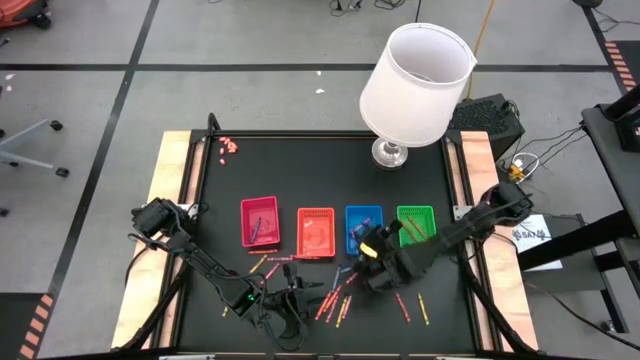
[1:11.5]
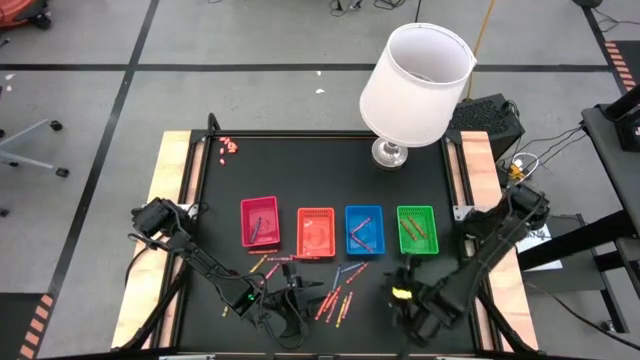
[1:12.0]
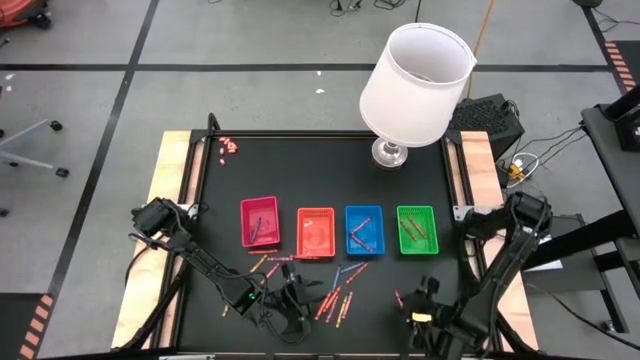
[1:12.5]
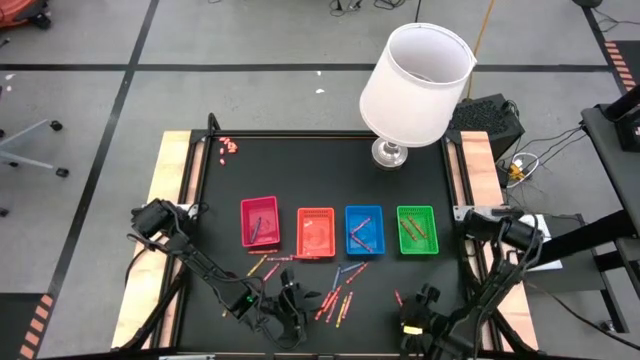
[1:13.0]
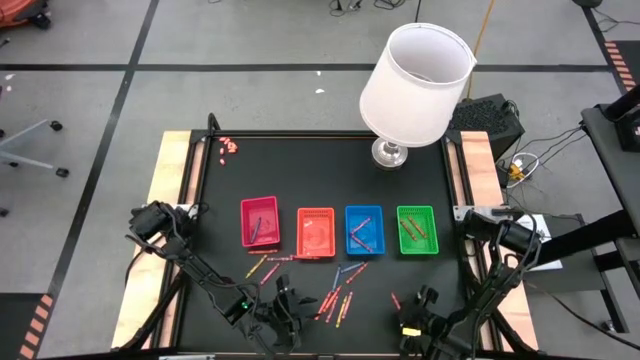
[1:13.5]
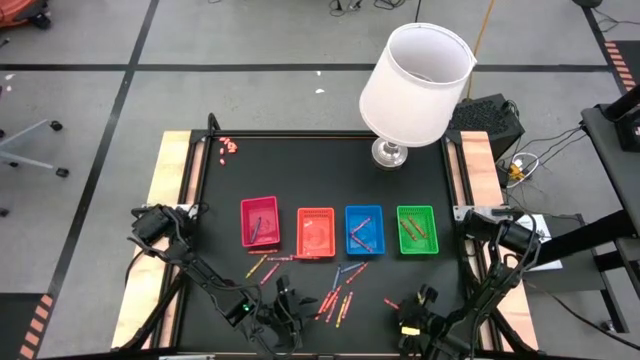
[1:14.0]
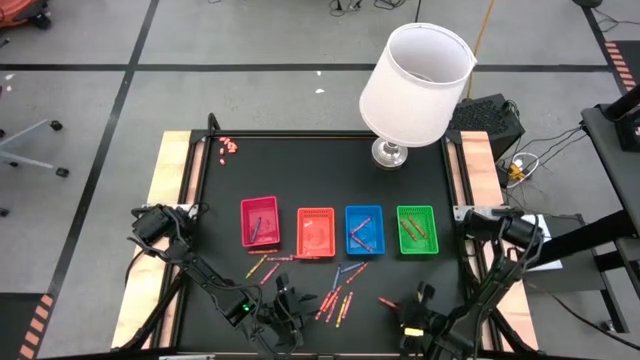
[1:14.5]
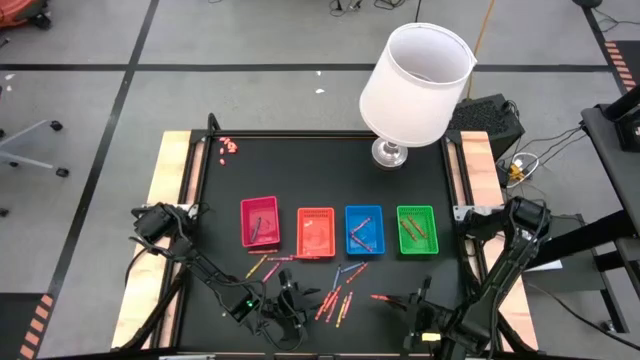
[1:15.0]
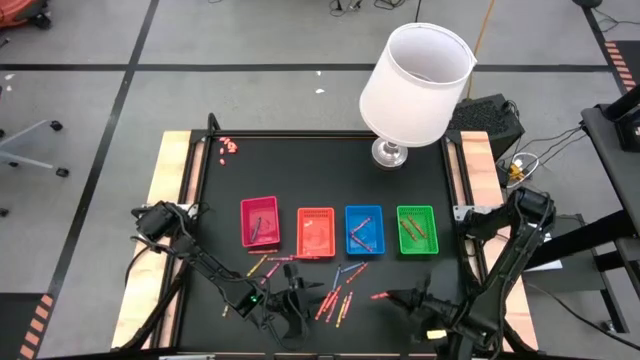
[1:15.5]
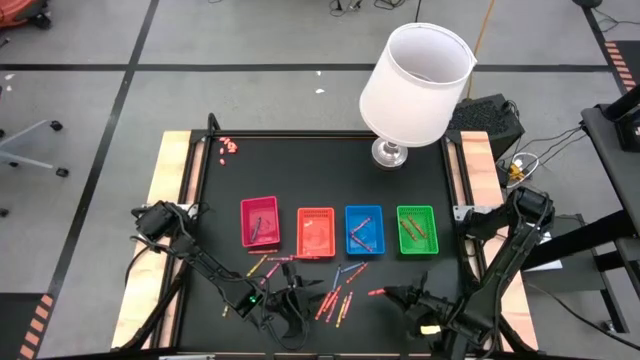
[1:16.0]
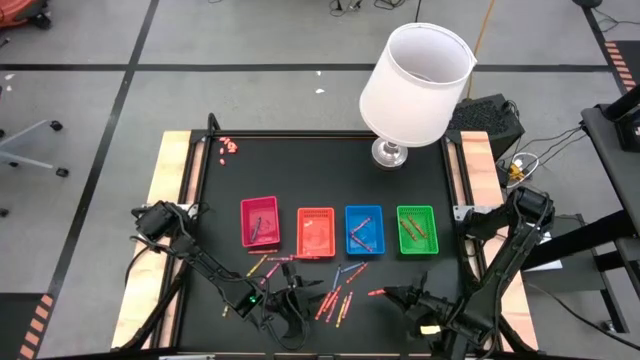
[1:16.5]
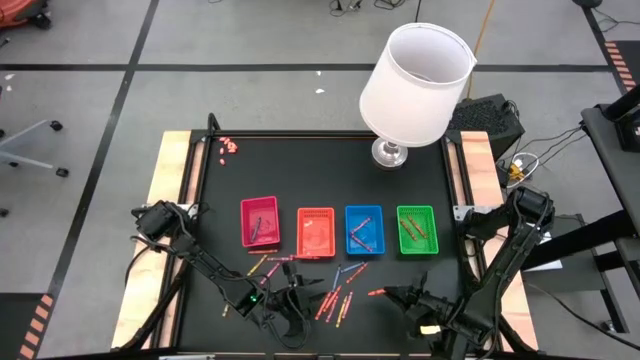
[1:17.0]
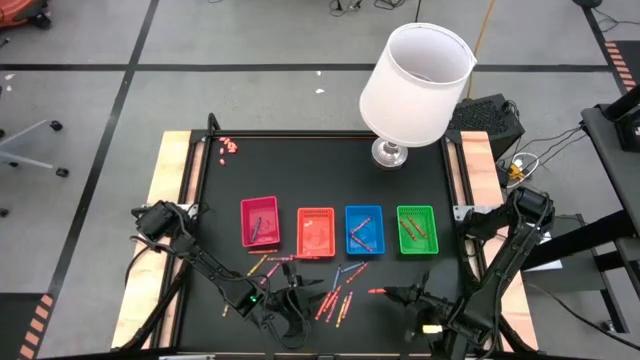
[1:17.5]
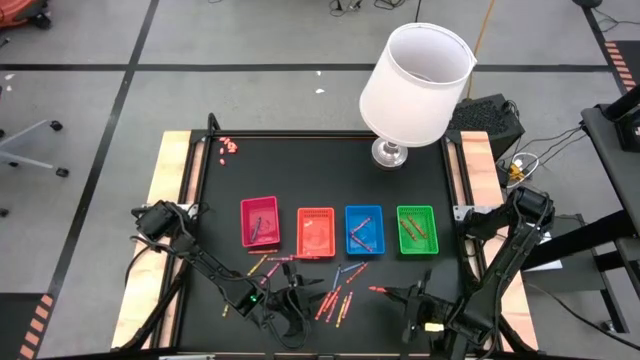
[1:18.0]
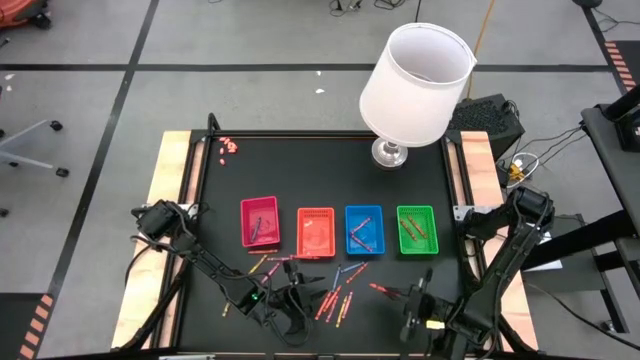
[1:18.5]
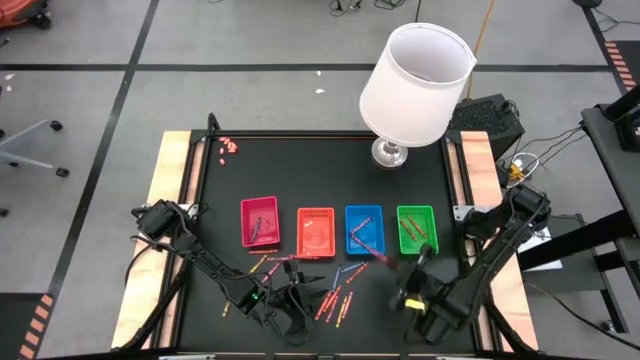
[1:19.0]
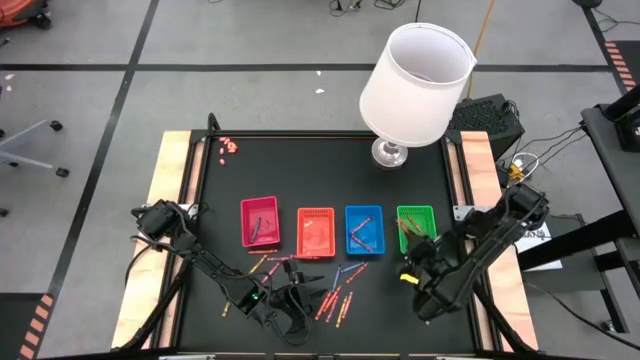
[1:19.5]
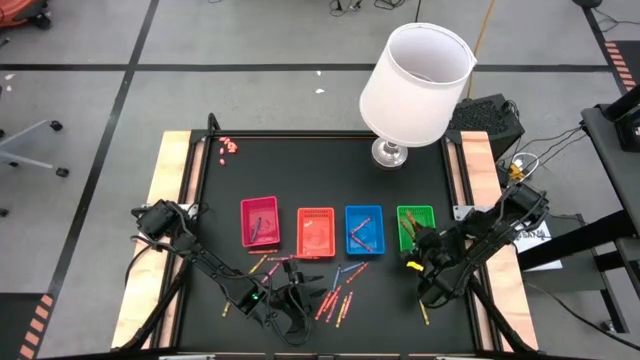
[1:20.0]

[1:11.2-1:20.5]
Task: Sort crayons
Put the orange crayon into the green bin

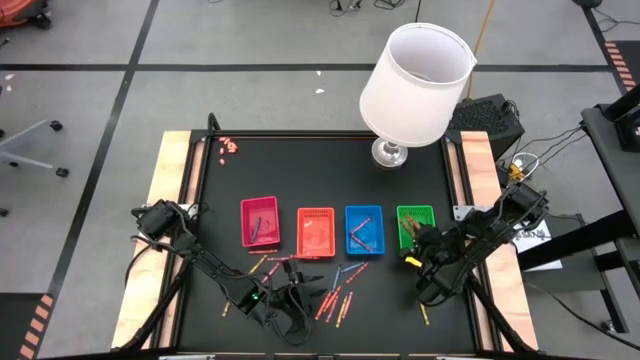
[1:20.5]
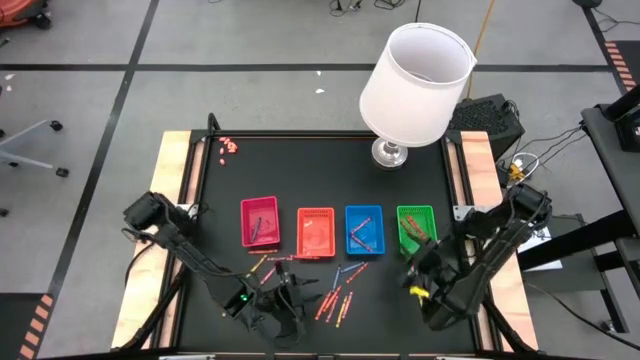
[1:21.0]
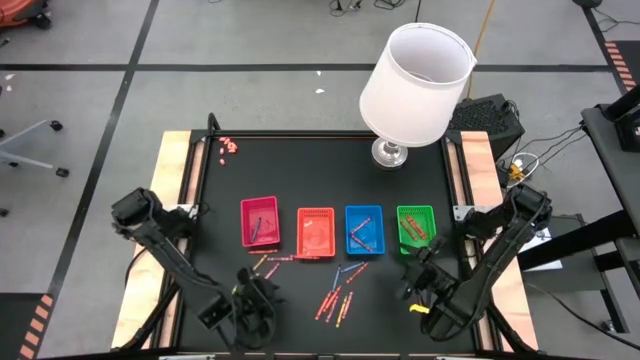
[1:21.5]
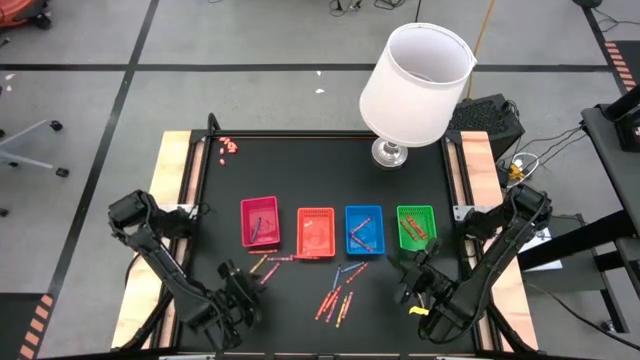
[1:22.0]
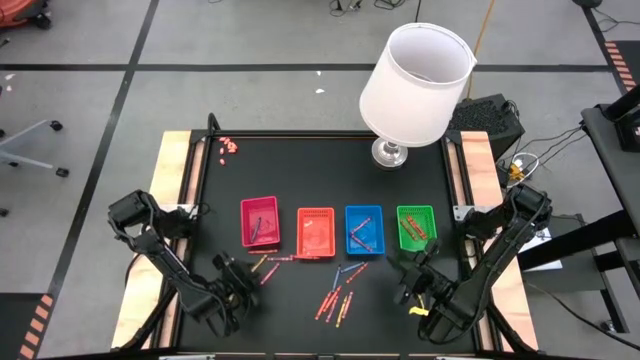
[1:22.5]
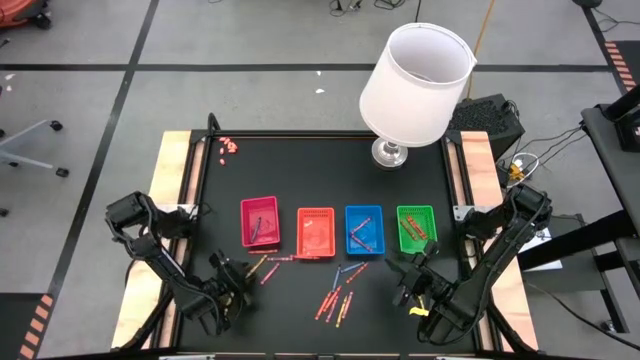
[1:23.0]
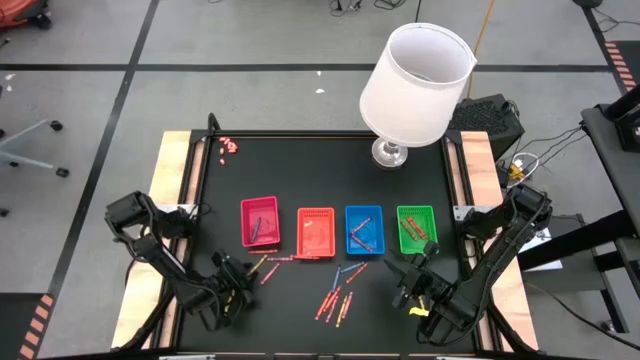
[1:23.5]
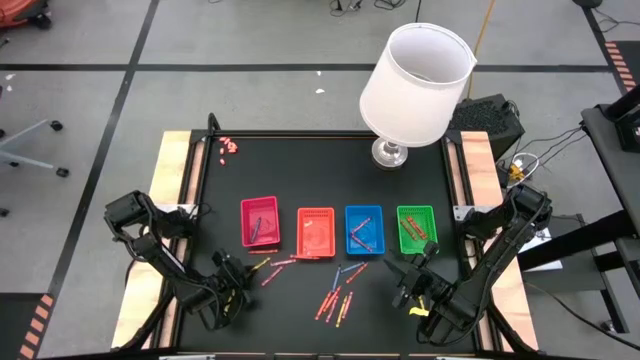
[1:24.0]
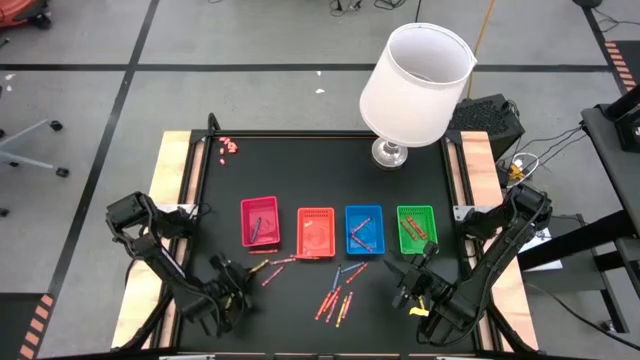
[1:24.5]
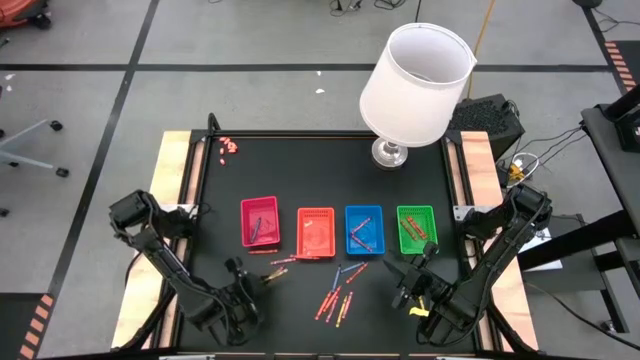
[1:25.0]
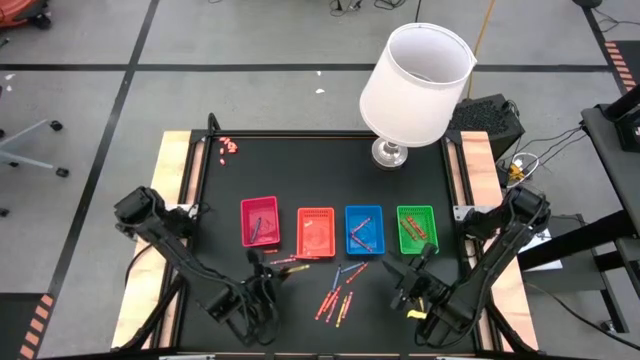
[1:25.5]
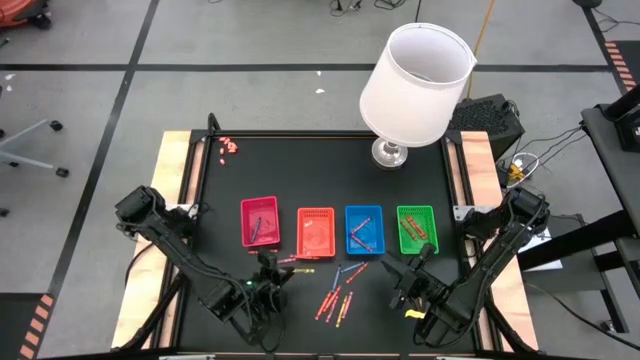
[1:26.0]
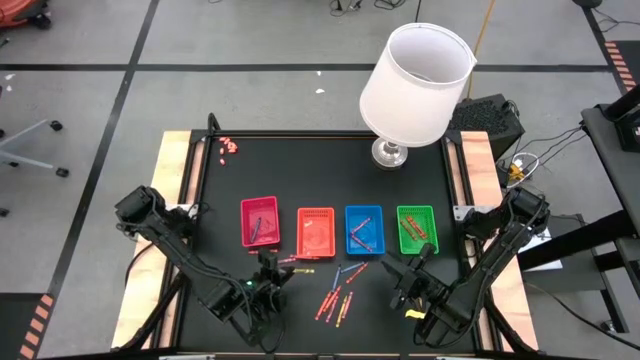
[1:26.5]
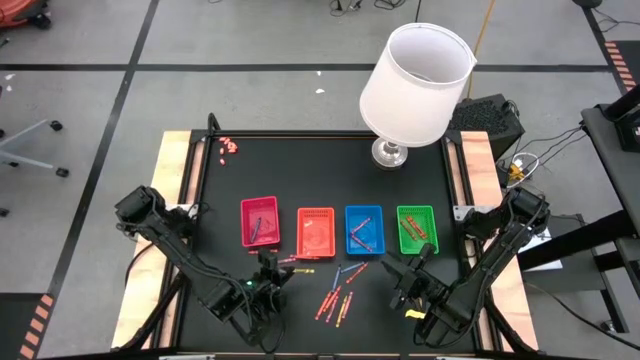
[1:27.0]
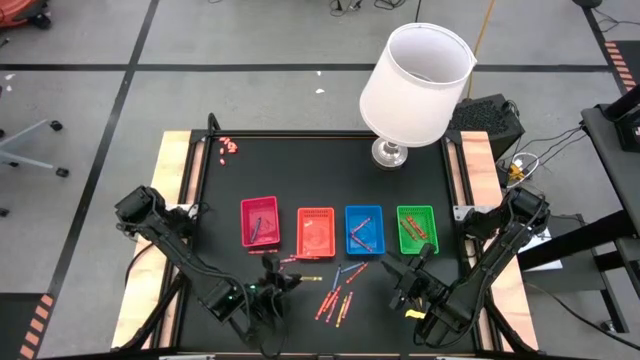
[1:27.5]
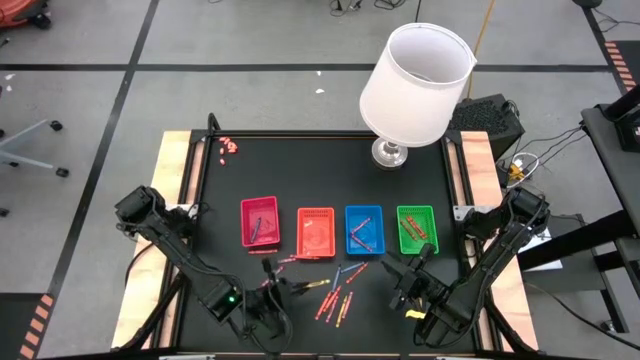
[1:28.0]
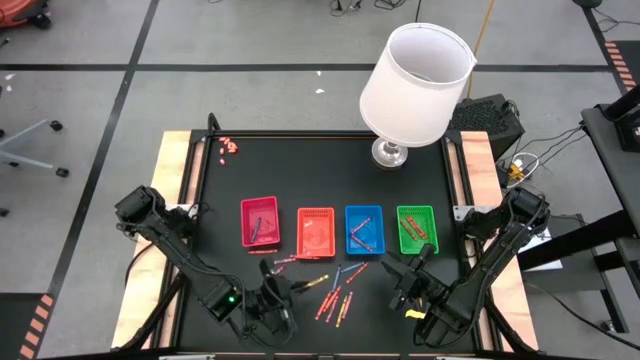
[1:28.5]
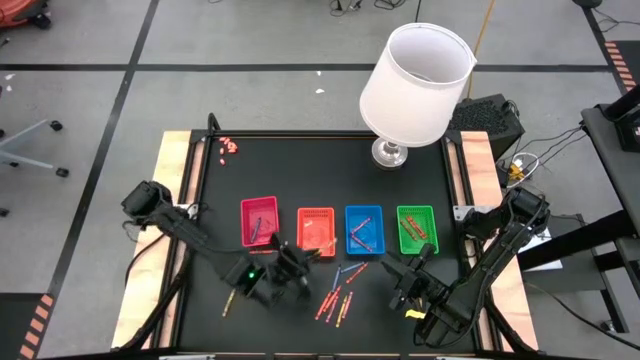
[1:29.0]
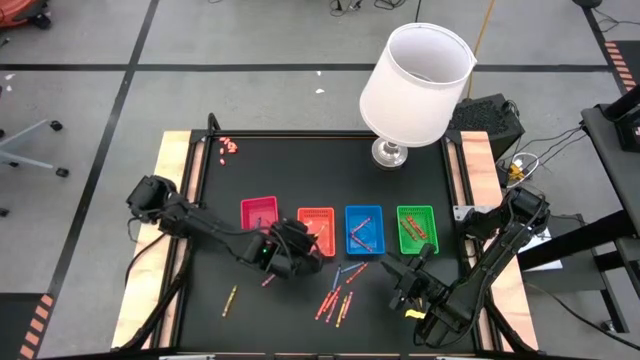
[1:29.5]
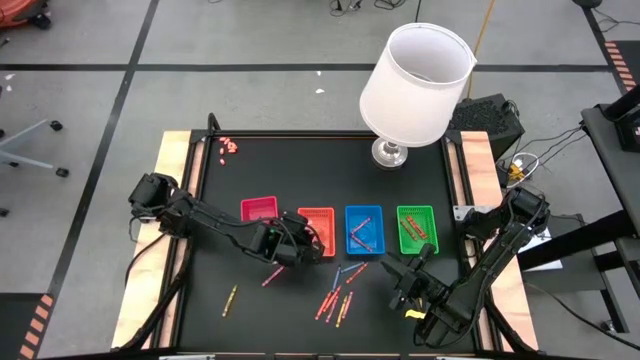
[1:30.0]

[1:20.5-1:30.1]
Put the yellow crayon into the orange bin

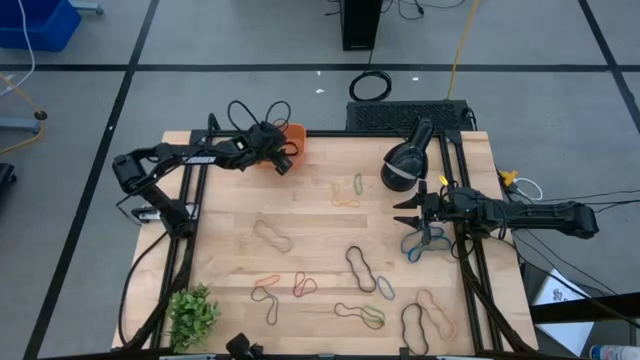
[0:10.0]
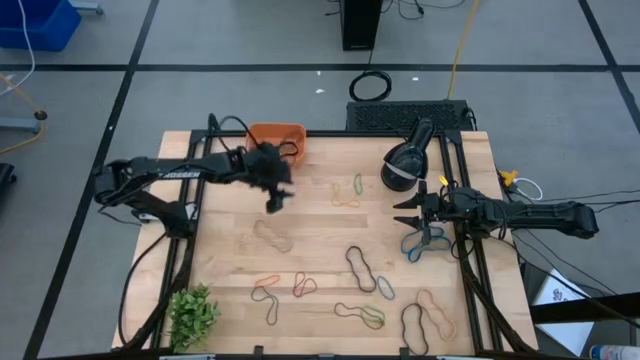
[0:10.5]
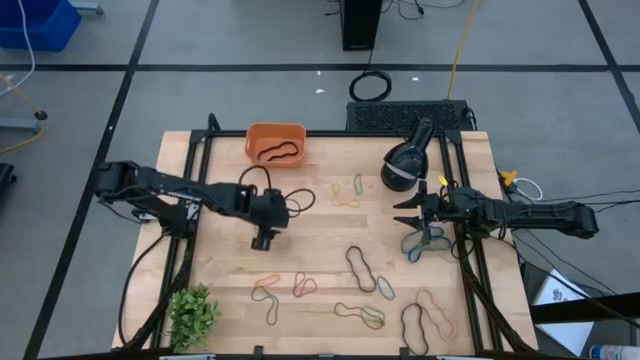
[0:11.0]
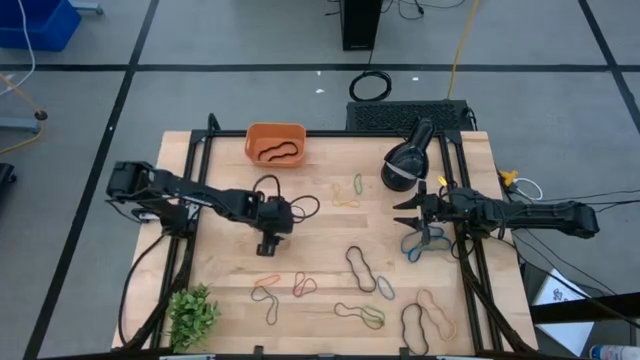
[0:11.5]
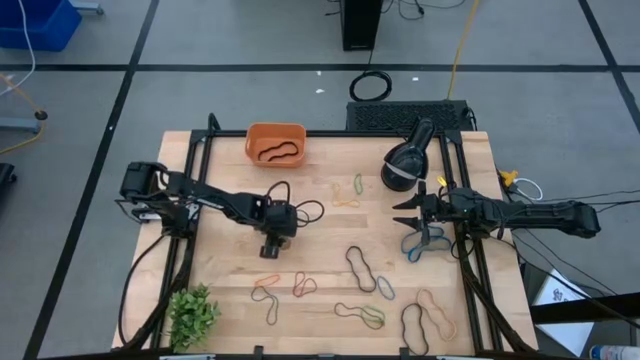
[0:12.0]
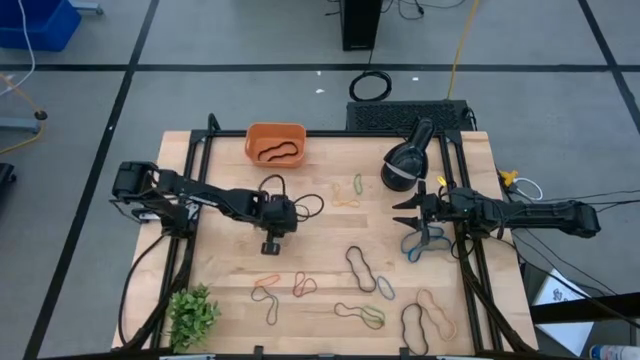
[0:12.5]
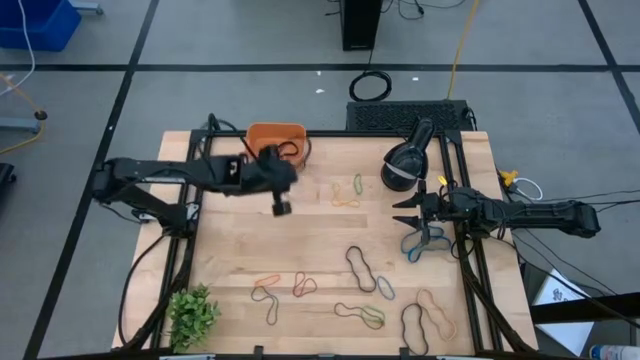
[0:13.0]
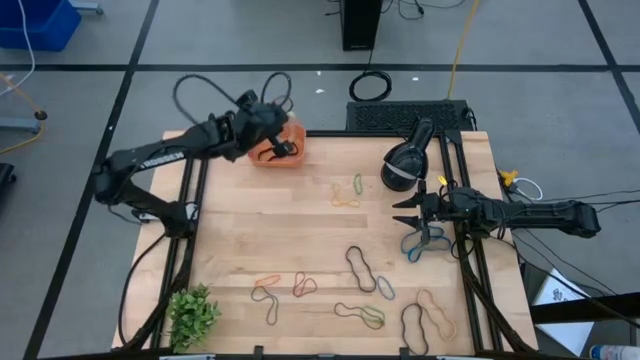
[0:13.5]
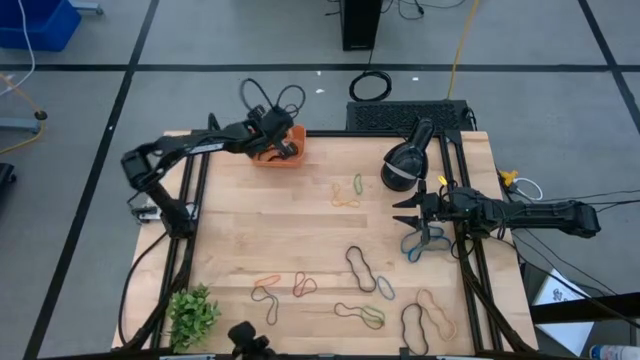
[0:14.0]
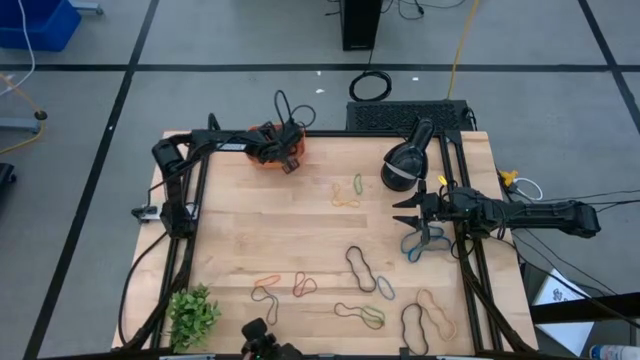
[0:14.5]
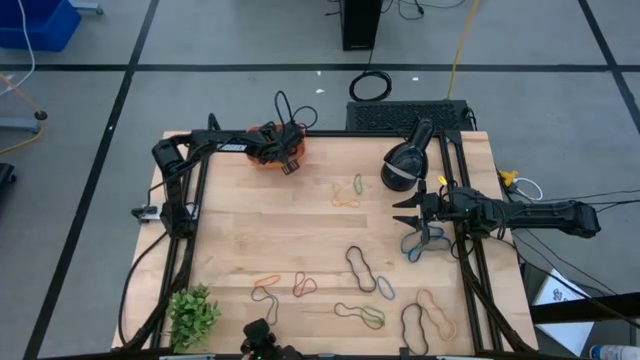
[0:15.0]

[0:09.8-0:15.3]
Task: Pick and place rubber bands into bin
Put the top white rubber band into the orange container
